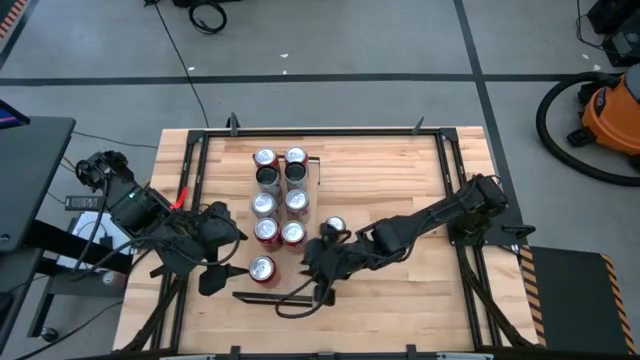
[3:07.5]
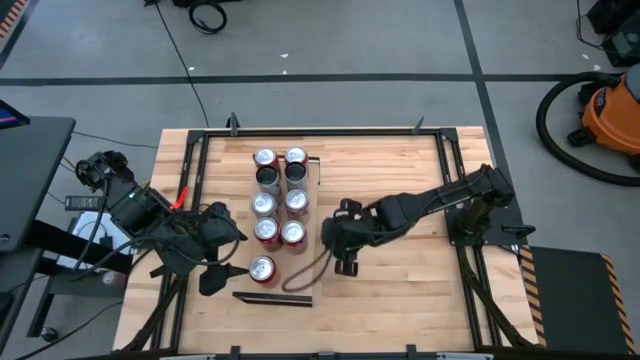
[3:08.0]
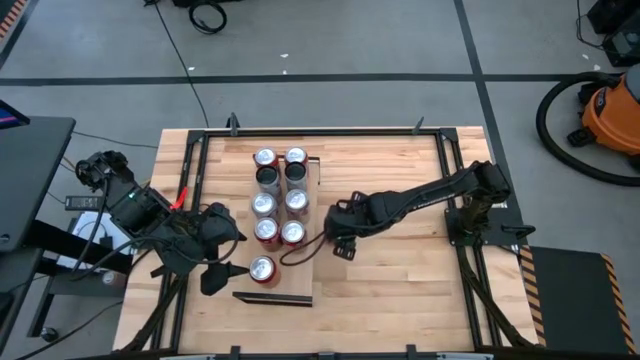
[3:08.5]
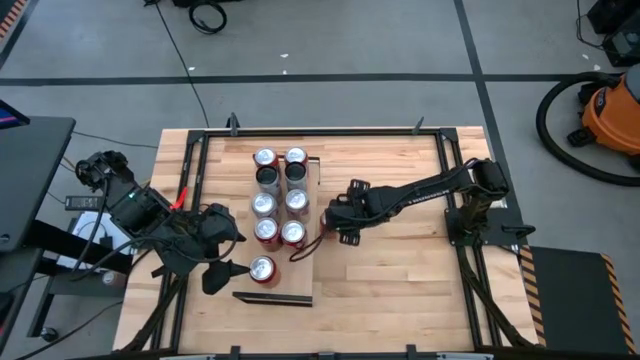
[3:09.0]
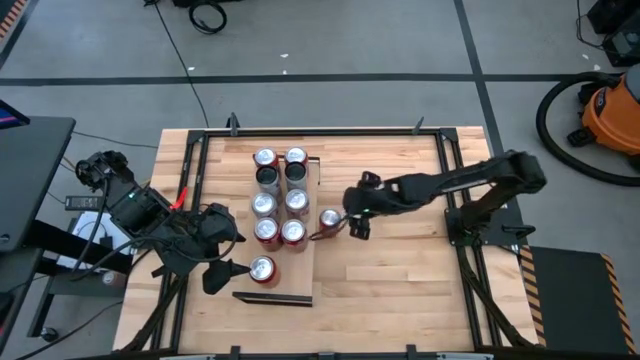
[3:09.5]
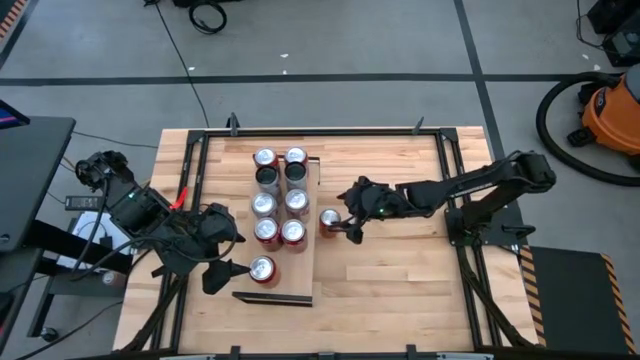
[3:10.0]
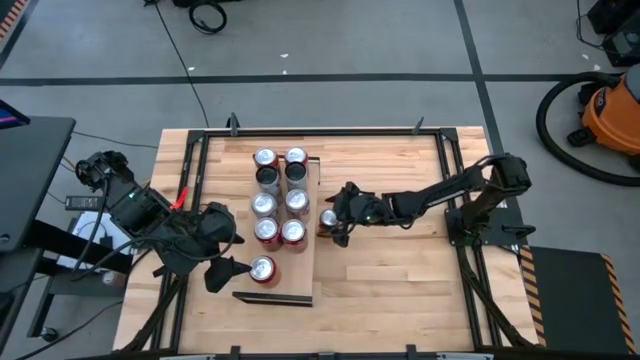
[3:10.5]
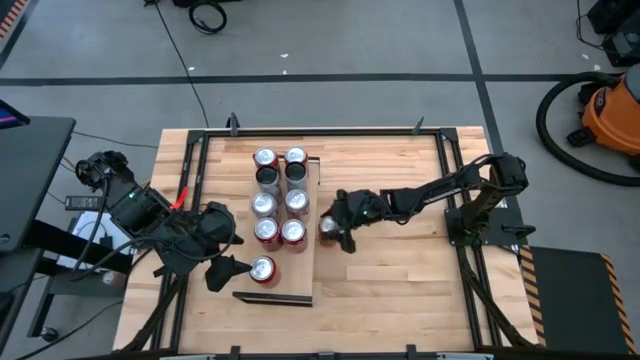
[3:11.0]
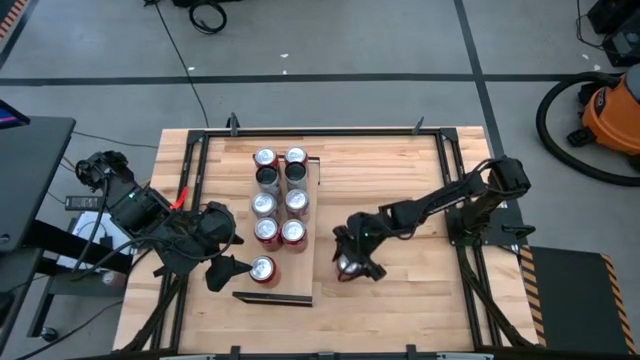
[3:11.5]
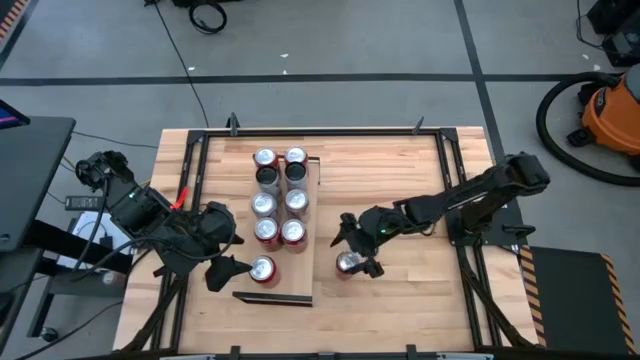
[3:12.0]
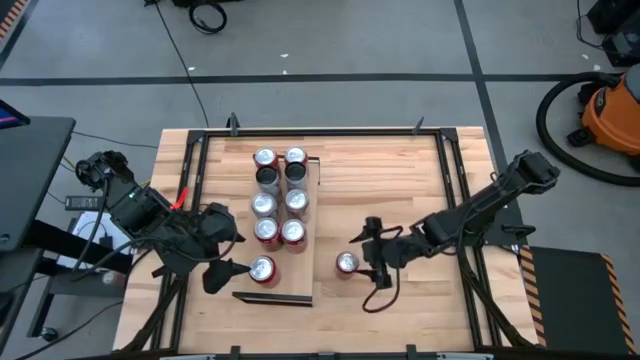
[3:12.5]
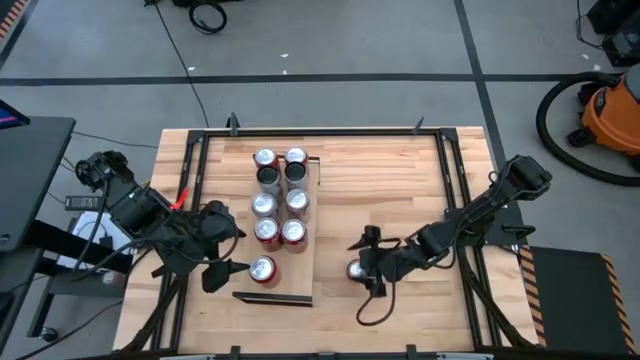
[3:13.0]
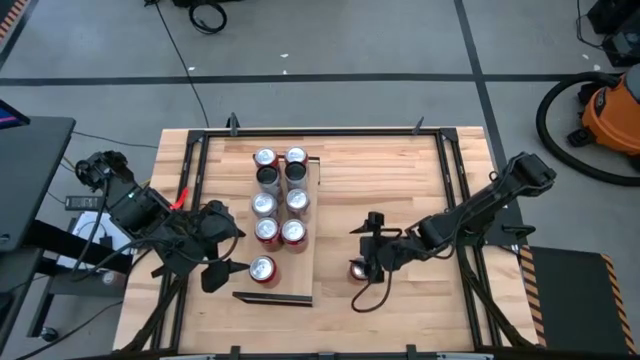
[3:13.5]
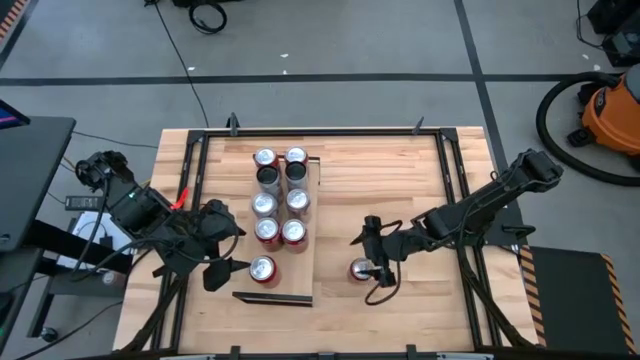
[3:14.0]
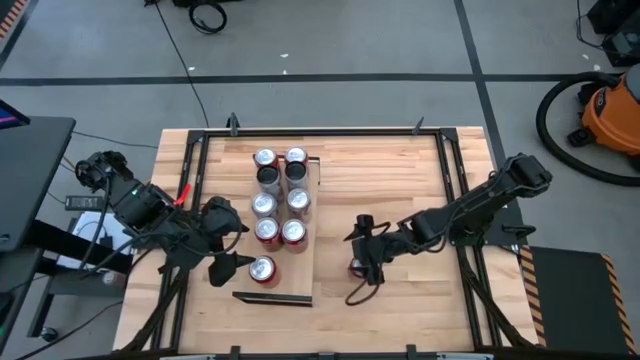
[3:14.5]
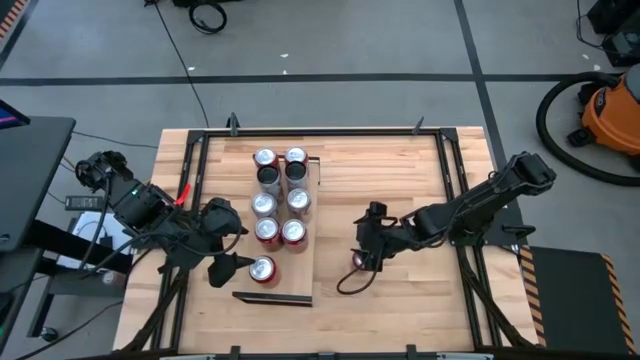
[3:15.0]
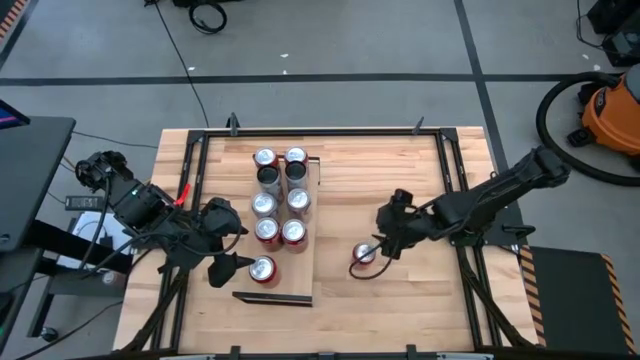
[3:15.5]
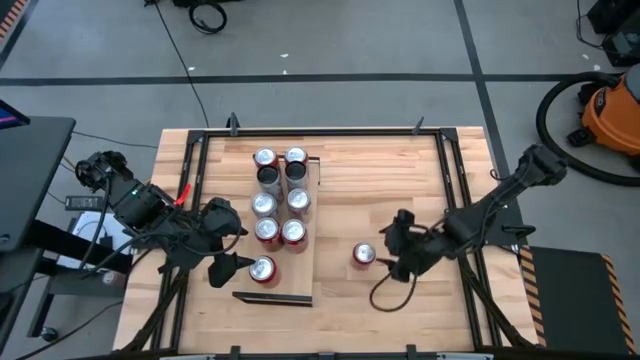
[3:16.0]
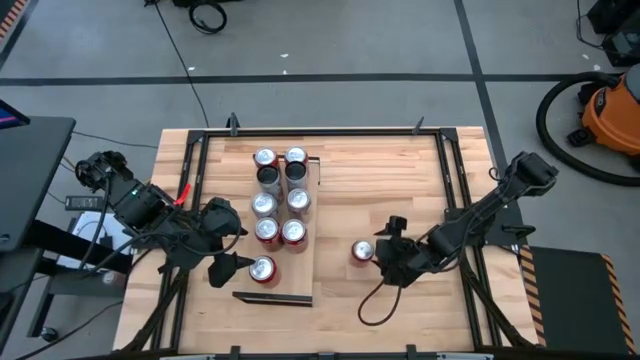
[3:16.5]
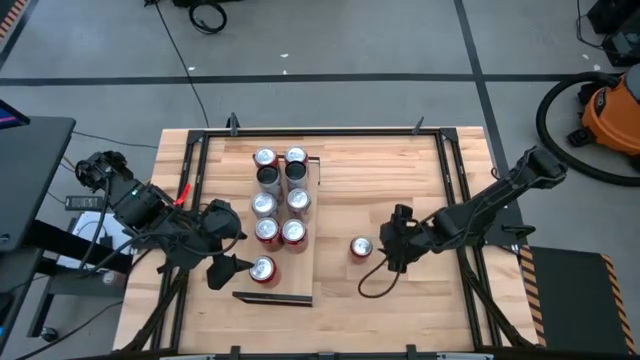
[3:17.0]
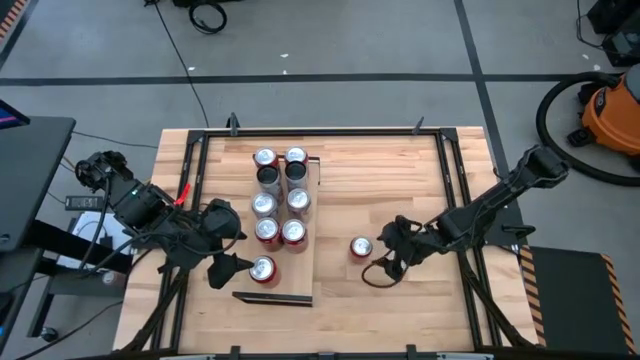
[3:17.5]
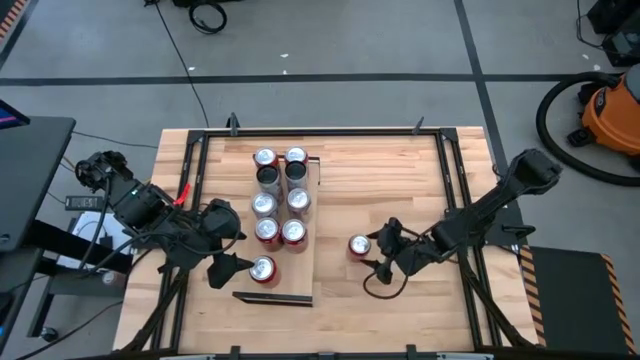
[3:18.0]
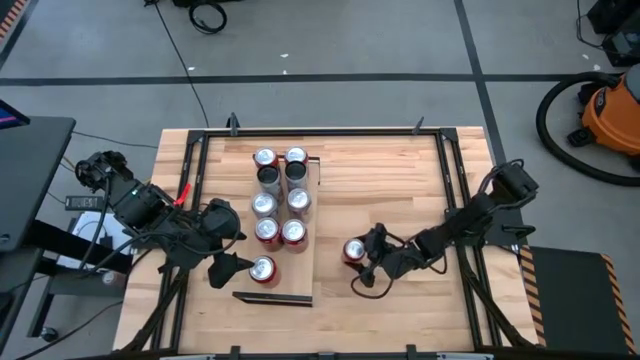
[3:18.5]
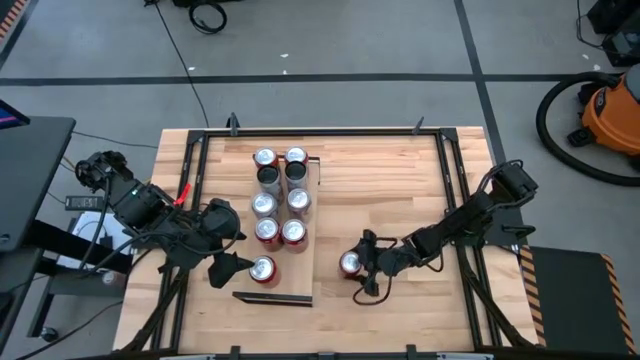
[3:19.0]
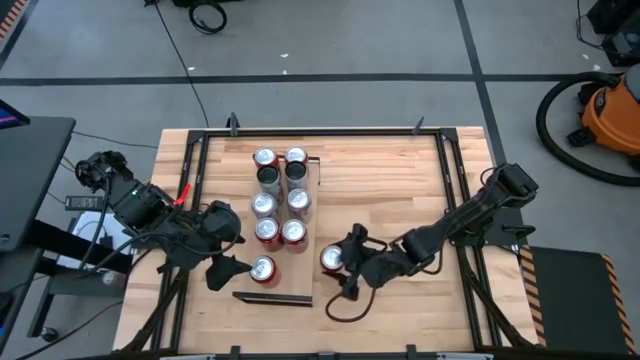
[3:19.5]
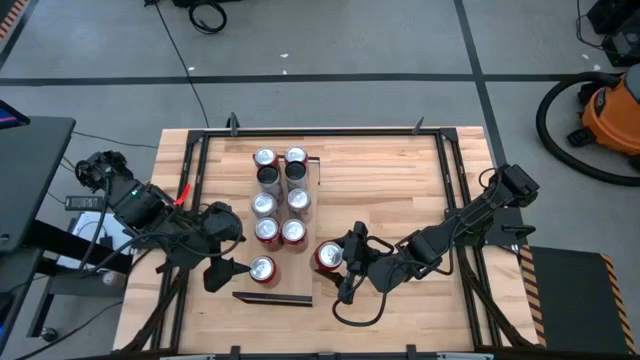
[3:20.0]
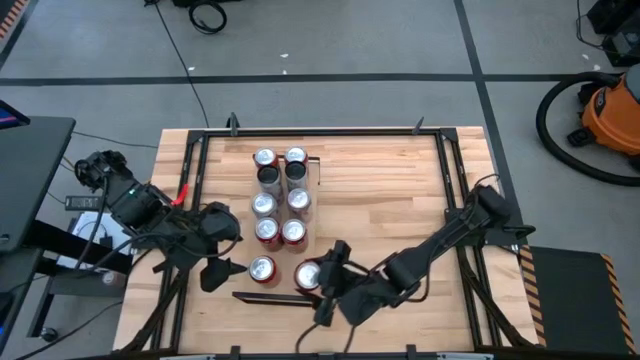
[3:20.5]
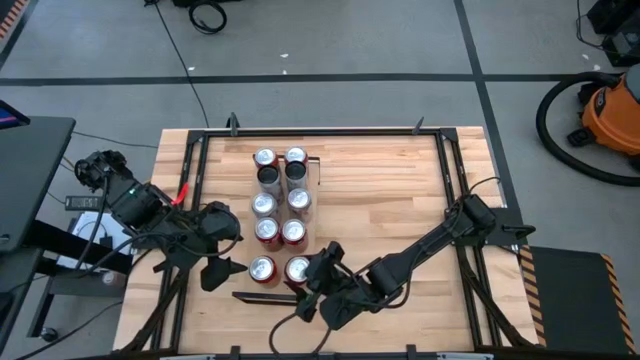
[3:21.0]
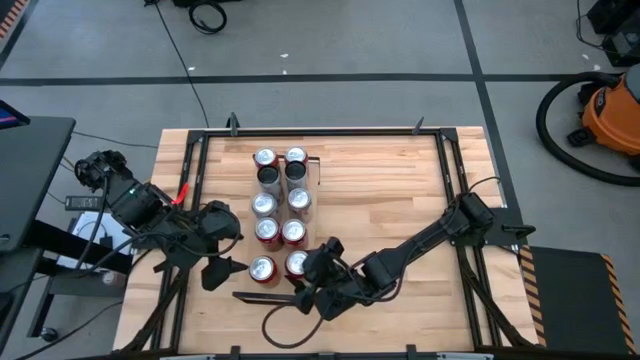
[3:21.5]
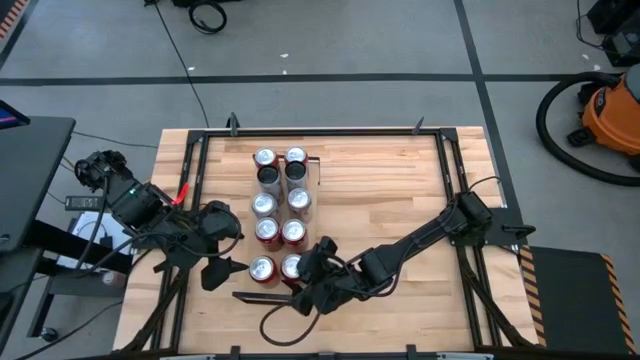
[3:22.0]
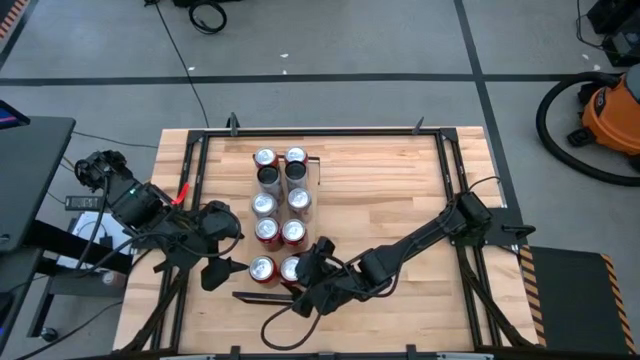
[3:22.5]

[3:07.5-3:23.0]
Task: Place canned beverage on shelf
Put the red and black soda can aligned with the other red and black soda can on the shelf

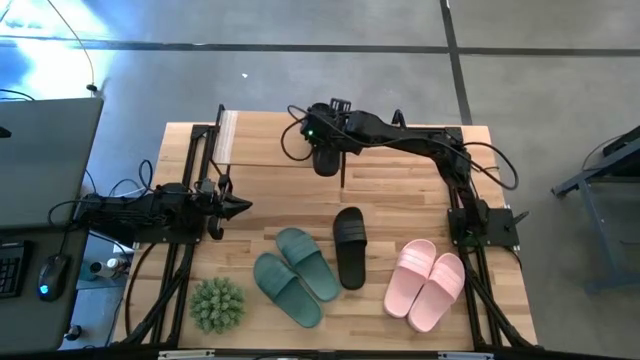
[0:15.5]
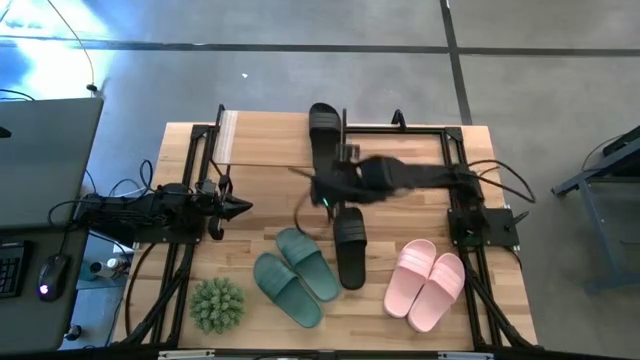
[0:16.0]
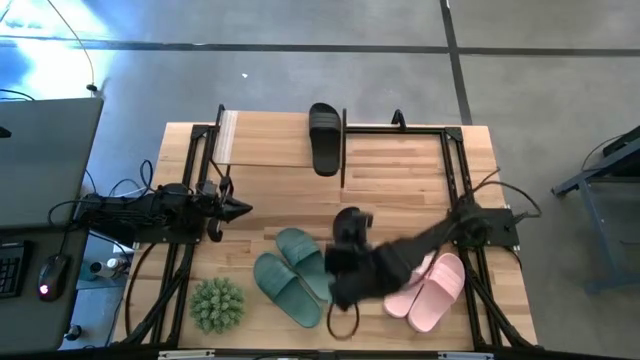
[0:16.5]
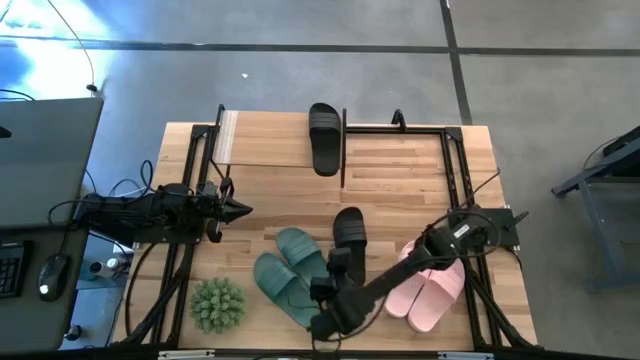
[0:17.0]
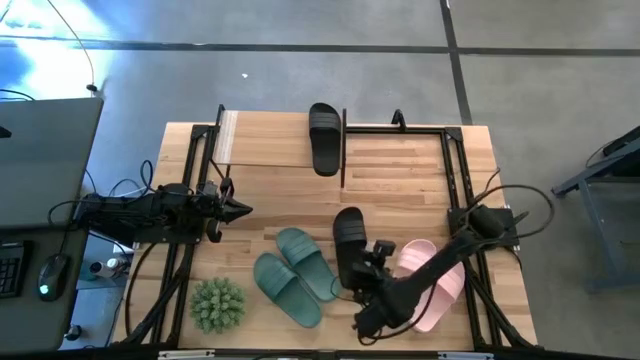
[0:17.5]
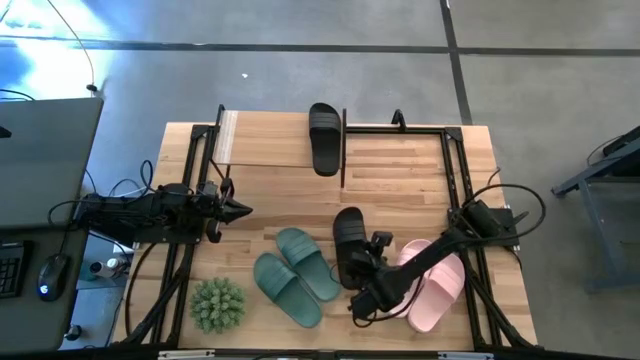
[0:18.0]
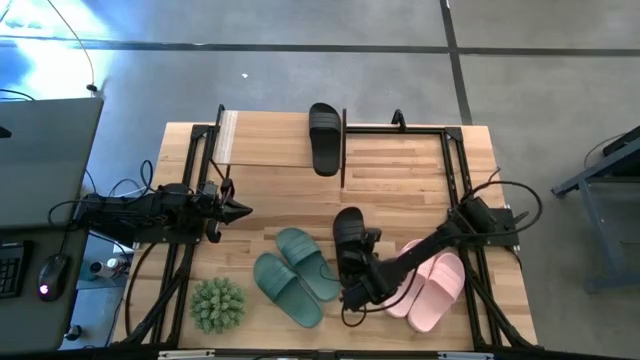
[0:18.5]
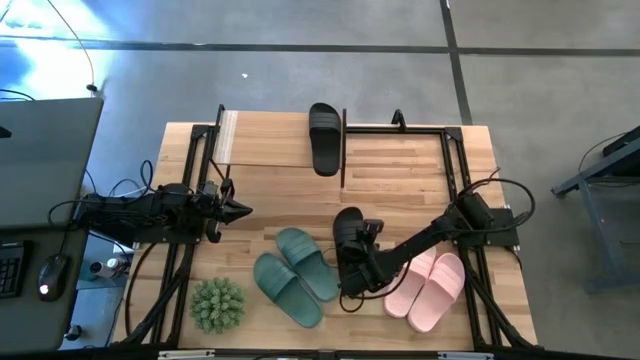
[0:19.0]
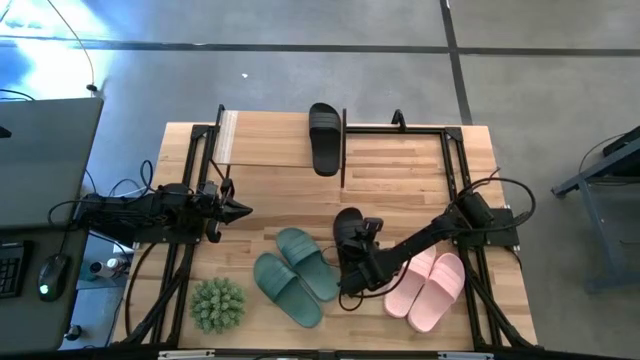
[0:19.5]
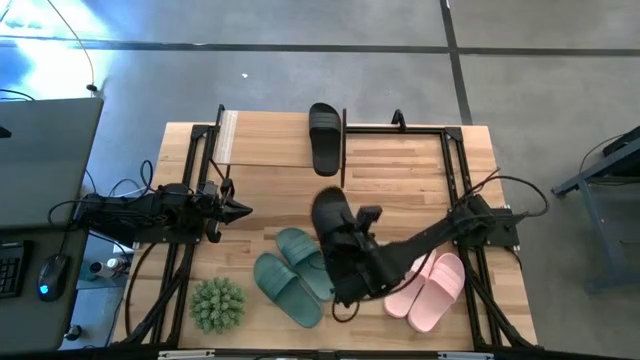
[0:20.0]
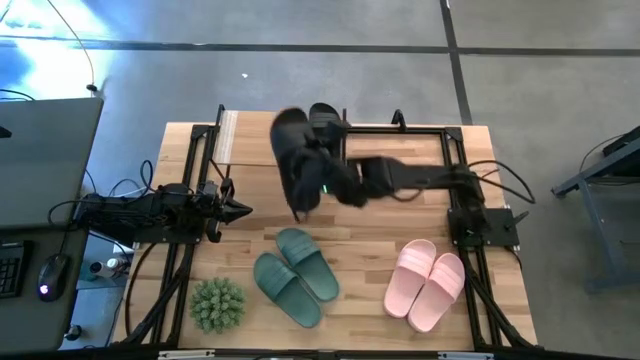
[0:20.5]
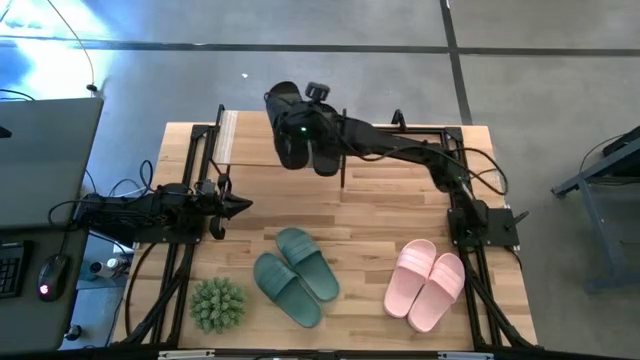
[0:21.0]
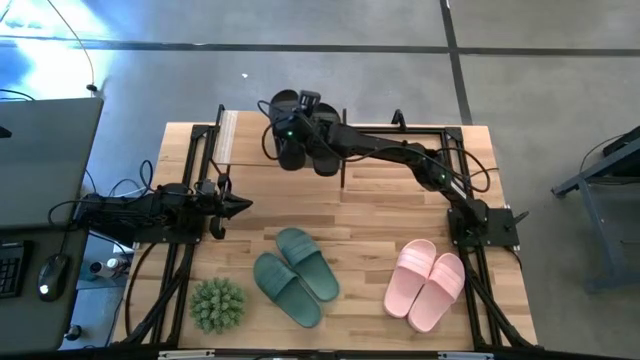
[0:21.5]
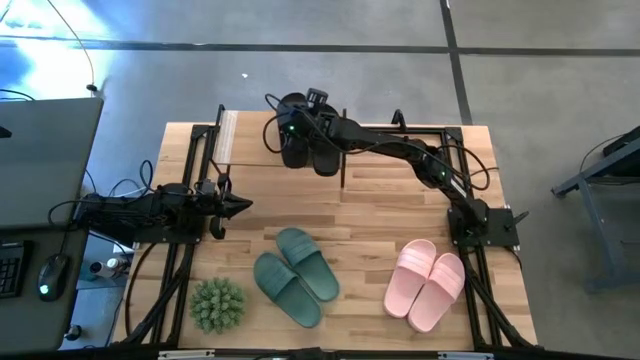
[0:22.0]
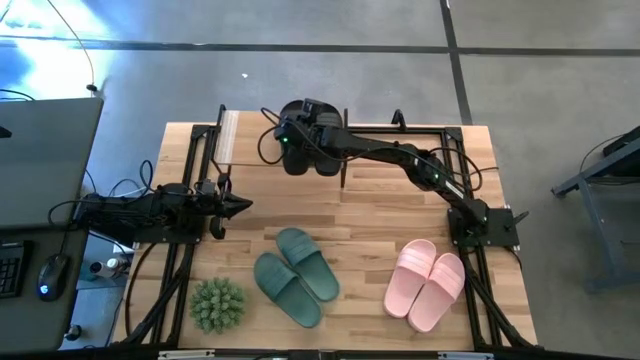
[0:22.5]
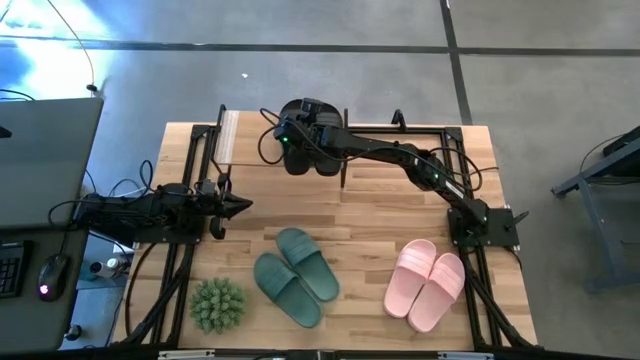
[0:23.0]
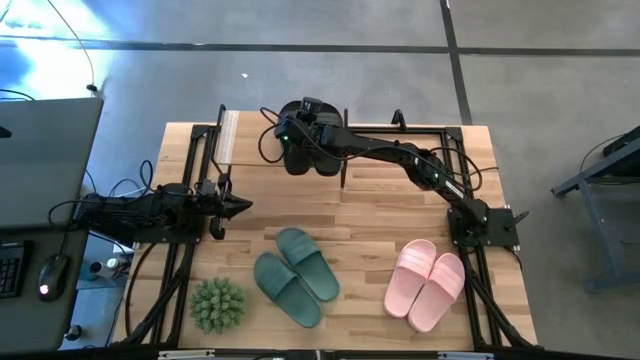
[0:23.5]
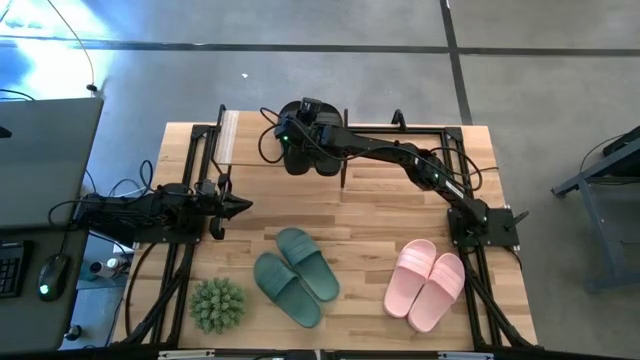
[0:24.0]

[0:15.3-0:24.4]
Task: Pick and place slides into the shelf
Put the black slide onto the shelf
